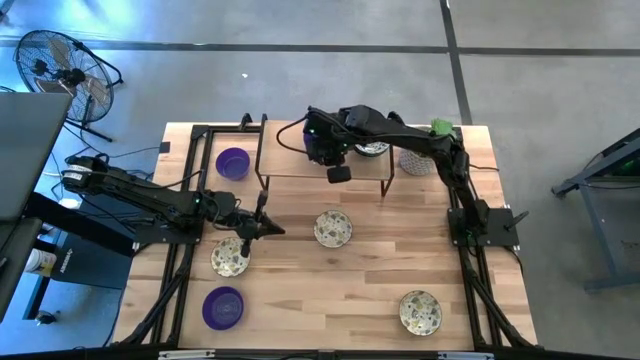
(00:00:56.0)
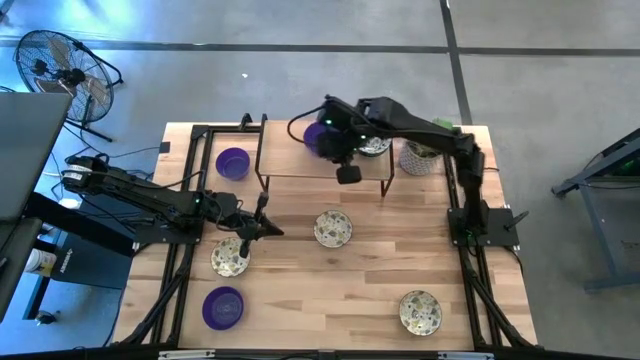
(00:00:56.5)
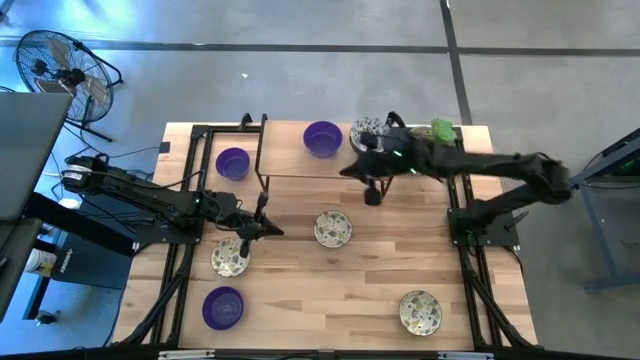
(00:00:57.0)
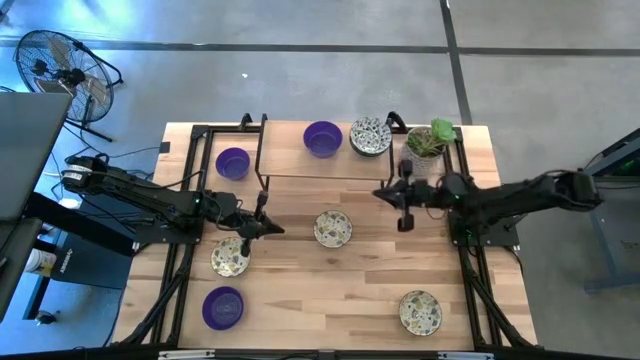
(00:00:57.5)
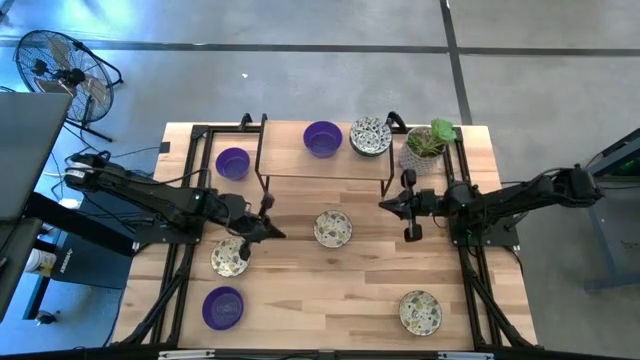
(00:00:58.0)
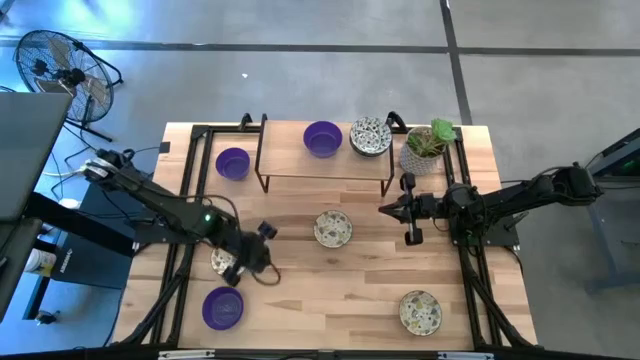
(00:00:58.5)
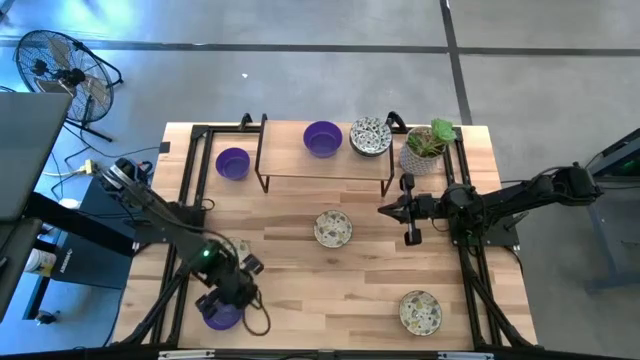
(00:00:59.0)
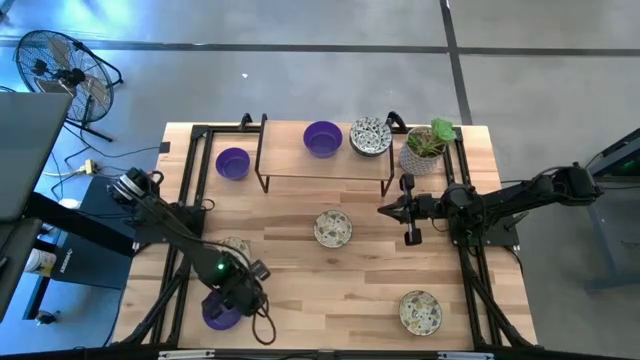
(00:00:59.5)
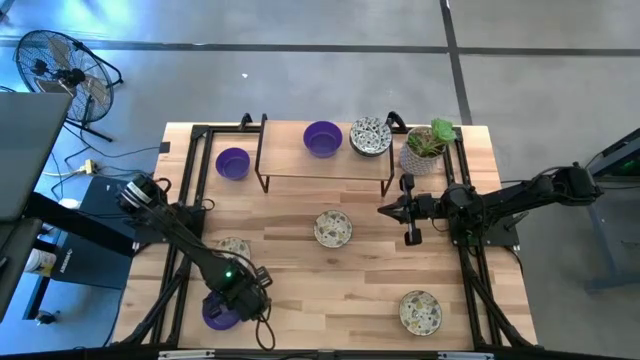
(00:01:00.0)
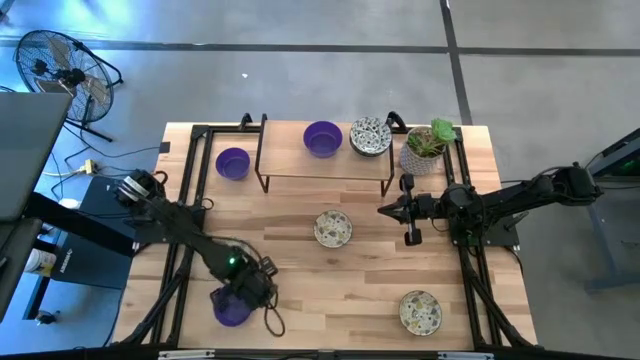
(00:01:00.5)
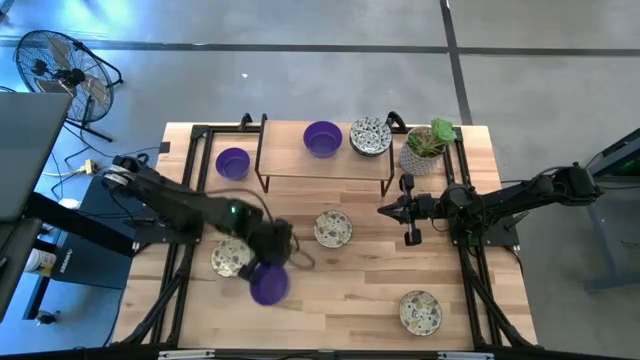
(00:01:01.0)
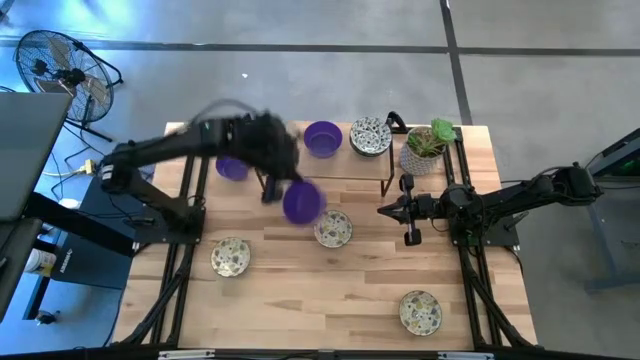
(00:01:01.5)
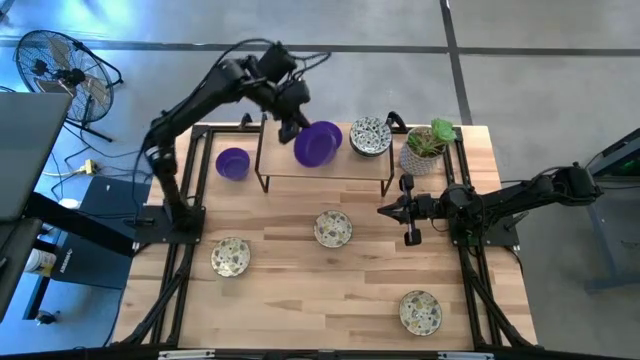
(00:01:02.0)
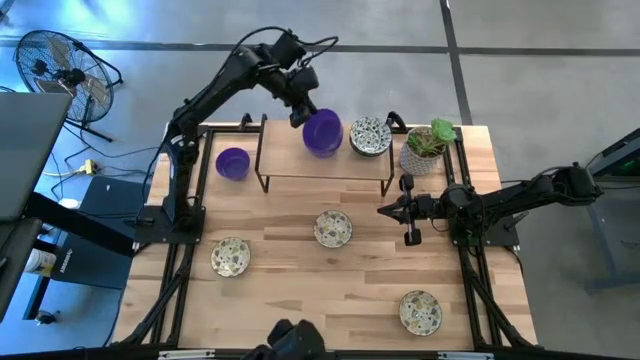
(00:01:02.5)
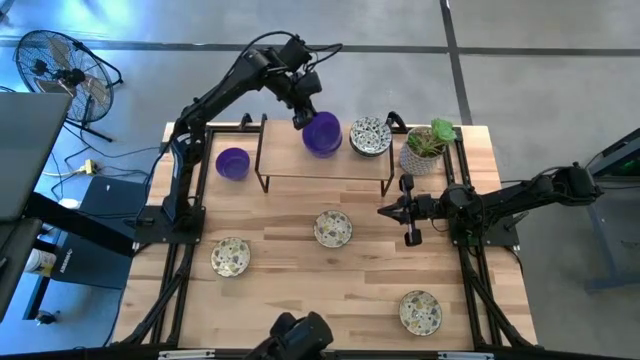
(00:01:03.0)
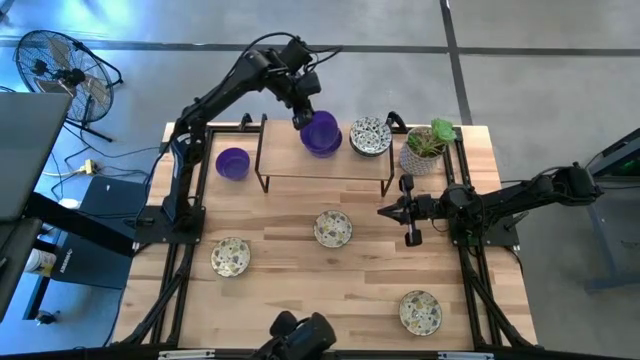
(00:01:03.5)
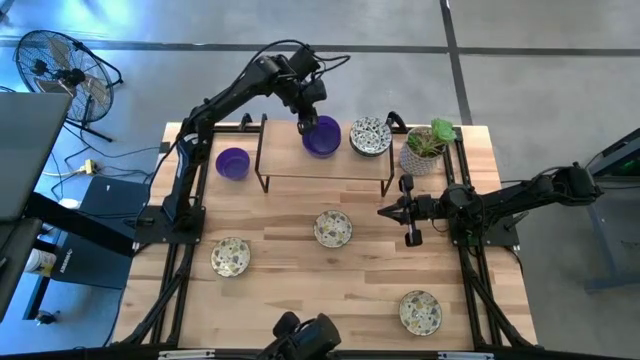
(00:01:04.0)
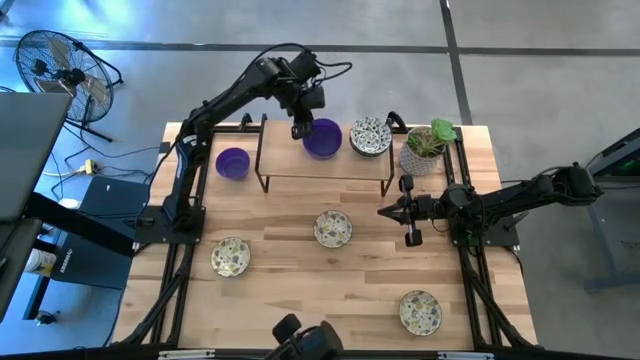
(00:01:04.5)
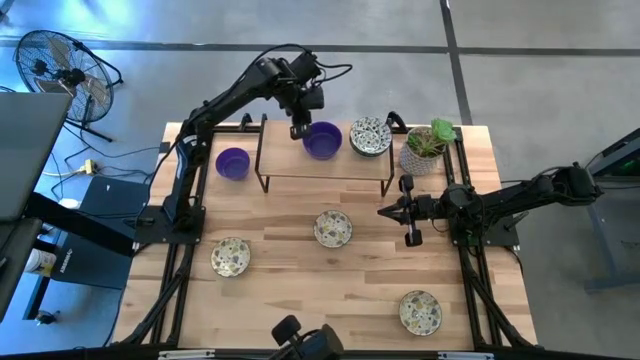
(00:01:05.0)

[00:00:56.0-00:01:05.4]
Task: Pick & Place Mini bowls
Stack the bottom violet bowl on the violet bowl on the shelf

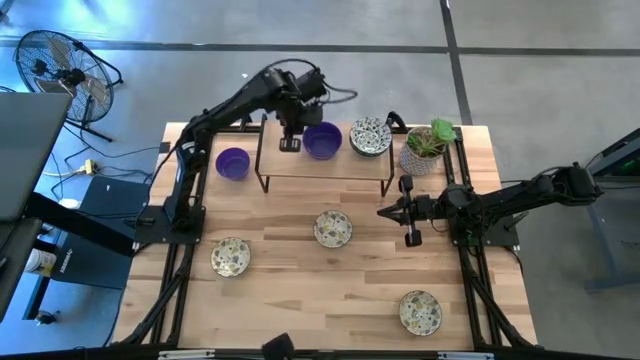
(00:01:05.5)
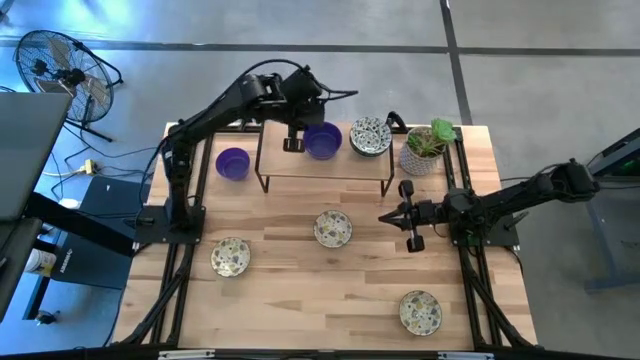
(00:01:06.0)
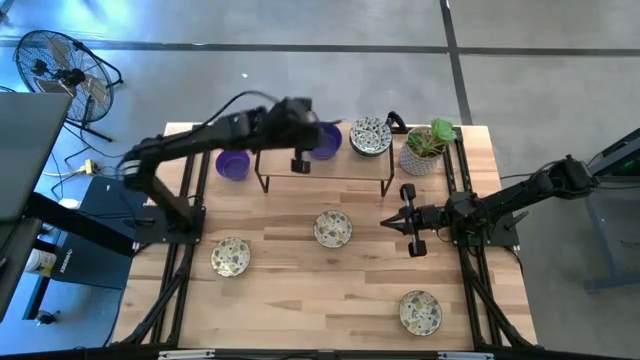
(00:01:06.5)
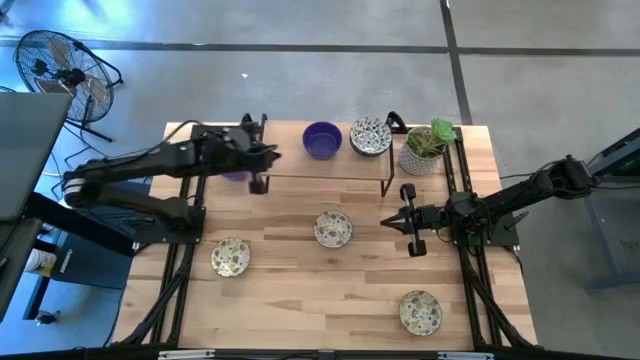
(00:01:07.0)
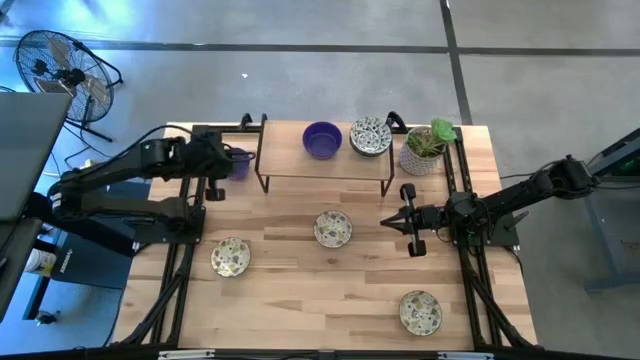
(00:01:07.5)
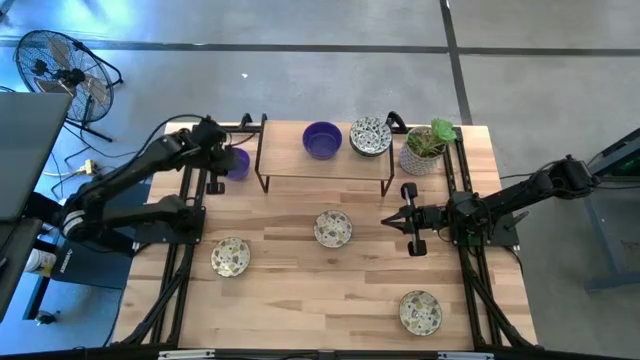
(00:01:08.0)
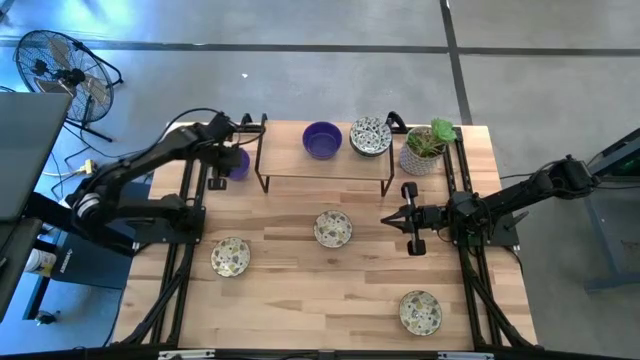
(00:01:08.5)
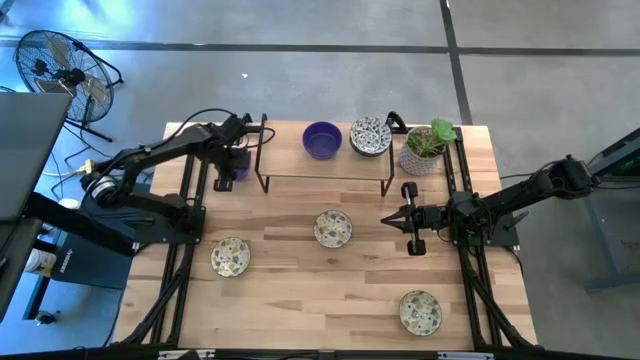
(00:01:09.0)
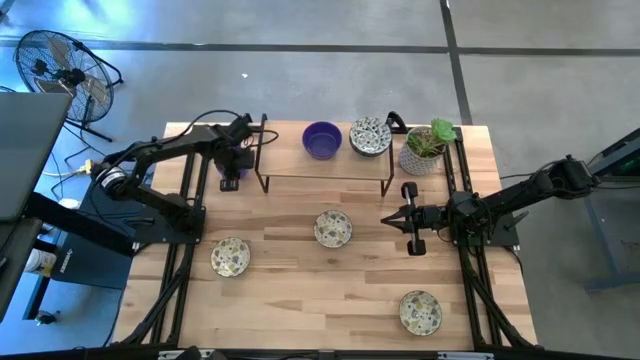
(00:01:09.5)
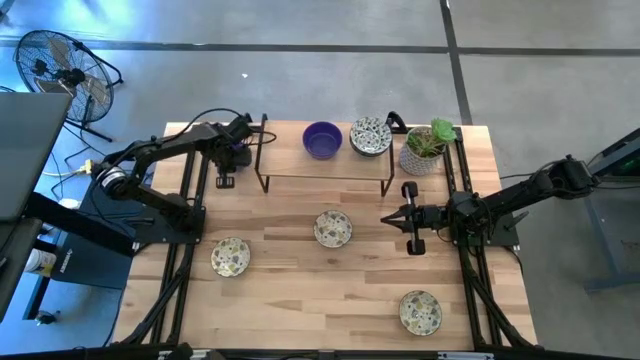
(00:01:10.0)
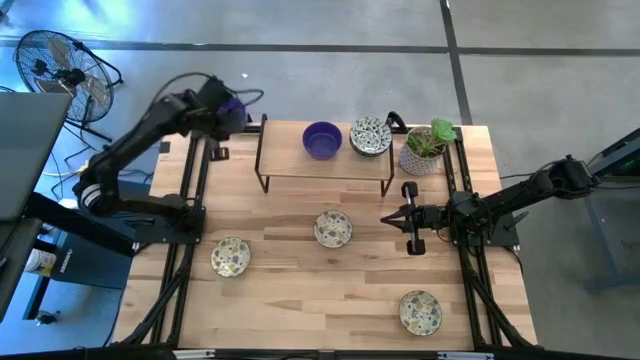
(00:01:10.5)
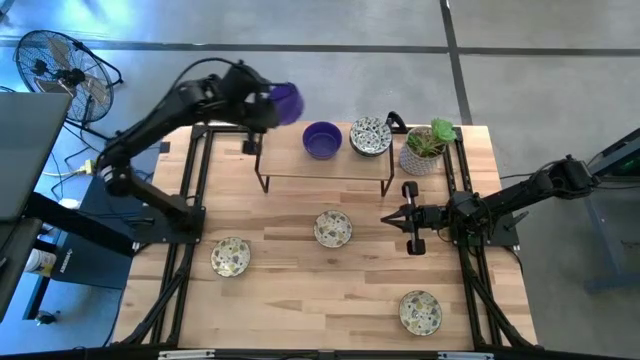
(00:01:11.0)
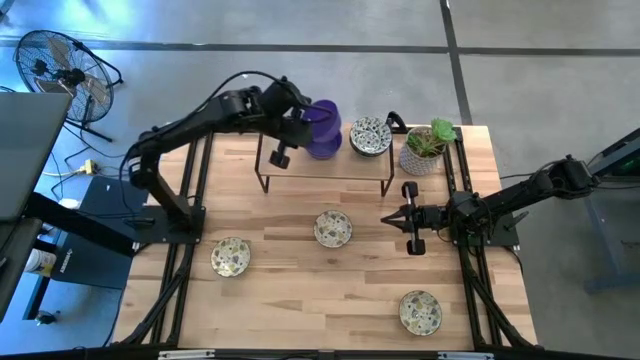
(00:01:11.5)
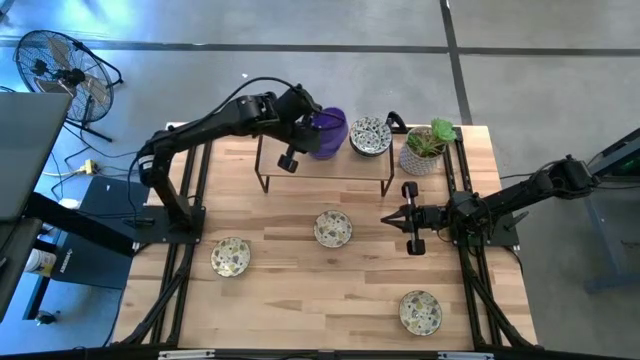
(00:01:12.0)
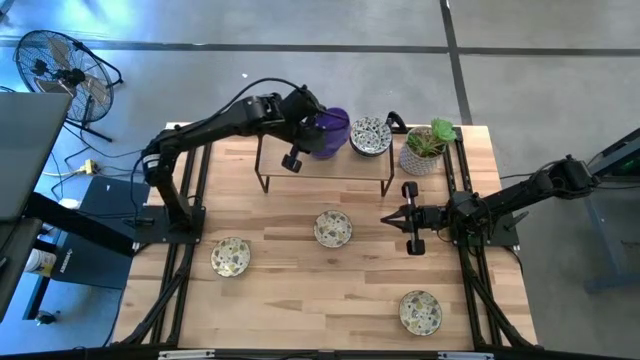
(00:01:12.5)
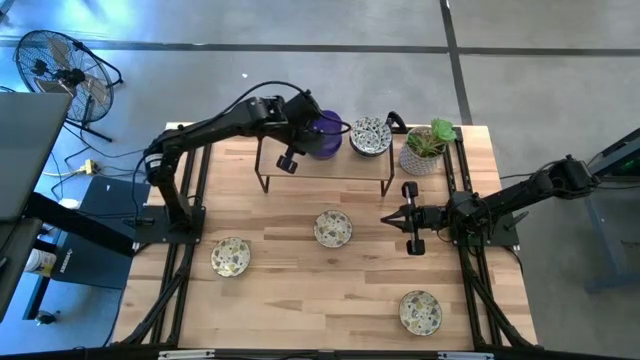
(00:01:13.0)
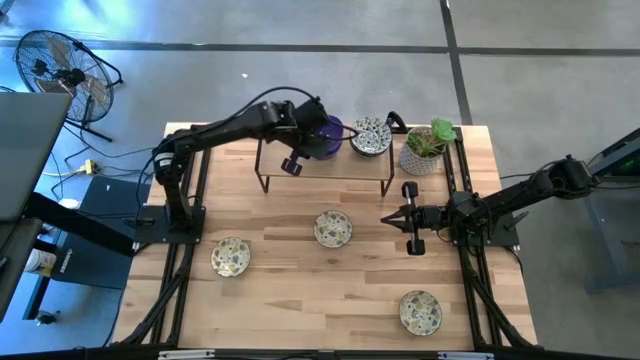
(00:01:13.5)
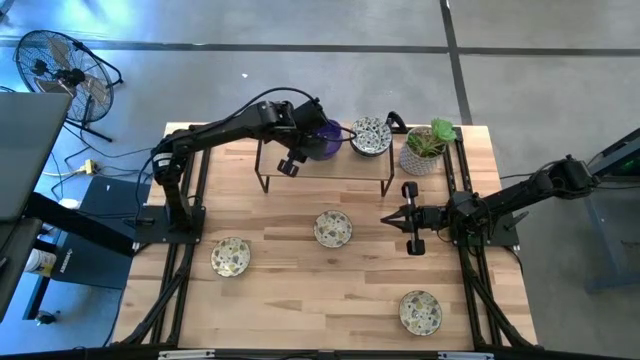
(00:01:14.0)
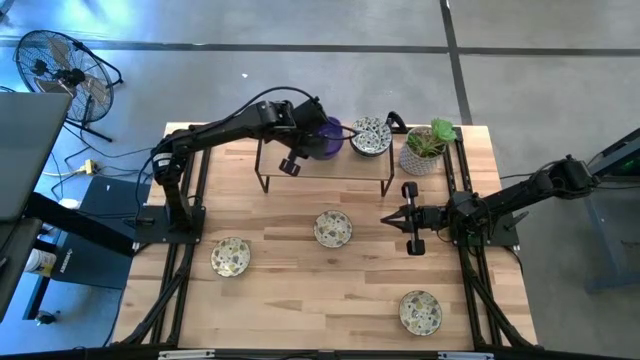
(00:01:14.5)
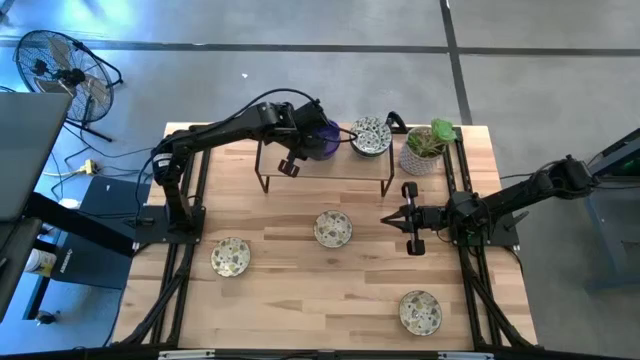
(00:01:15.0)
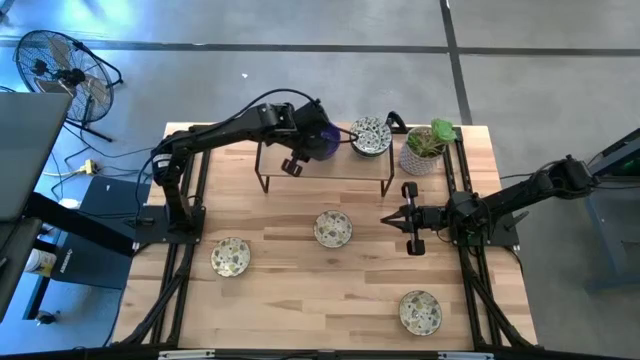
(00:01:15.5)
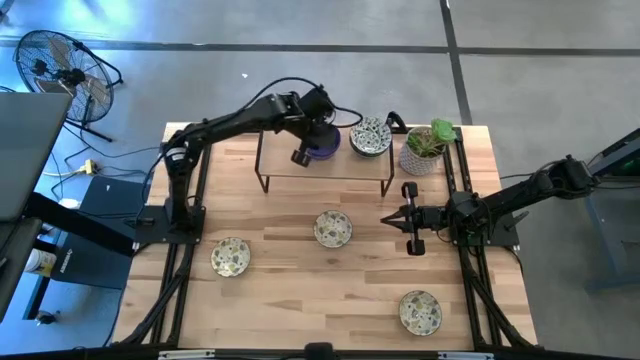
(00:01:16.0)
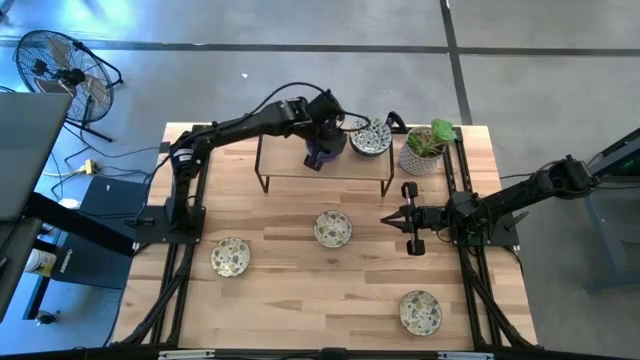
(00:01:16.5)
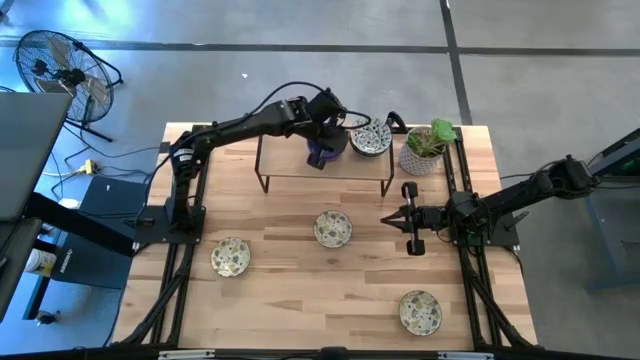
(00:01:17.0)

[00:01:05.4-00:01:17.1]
Stack the violet bowl on top of the violet bowl on the shelf
